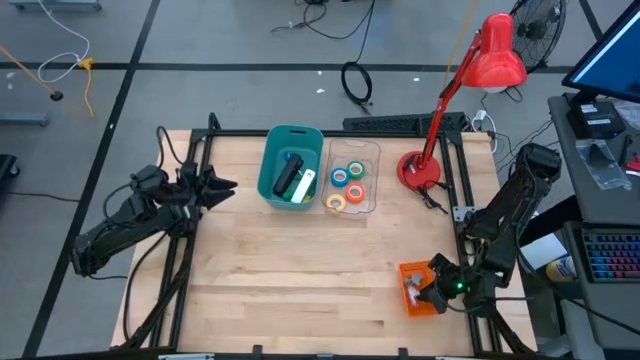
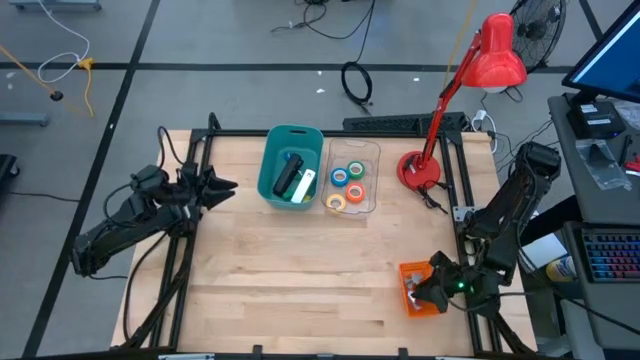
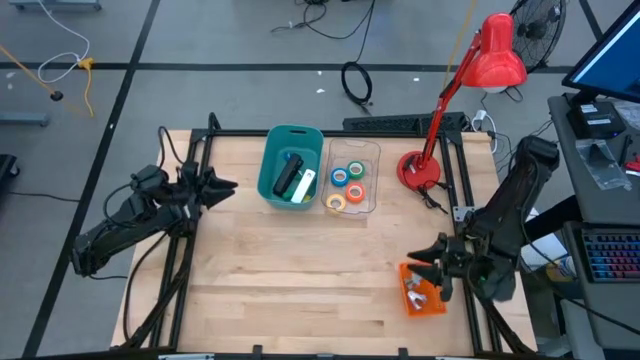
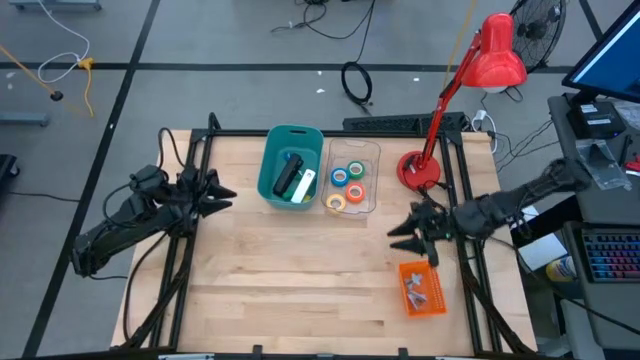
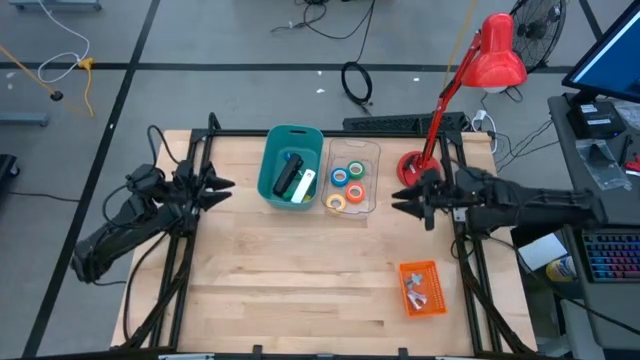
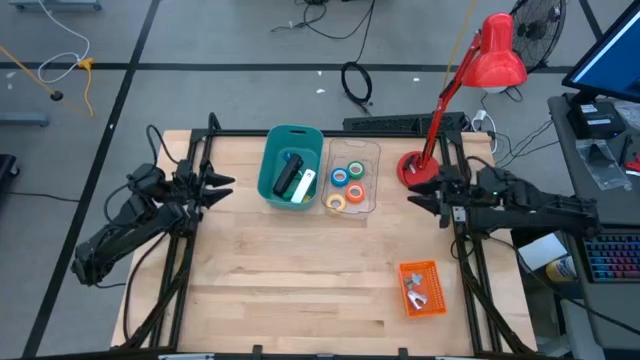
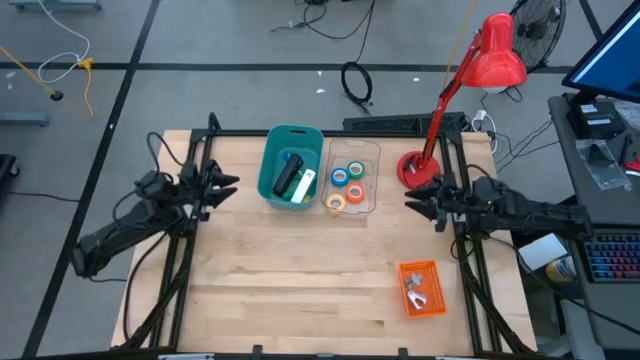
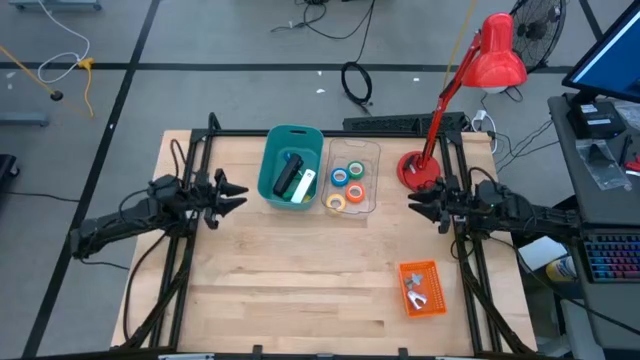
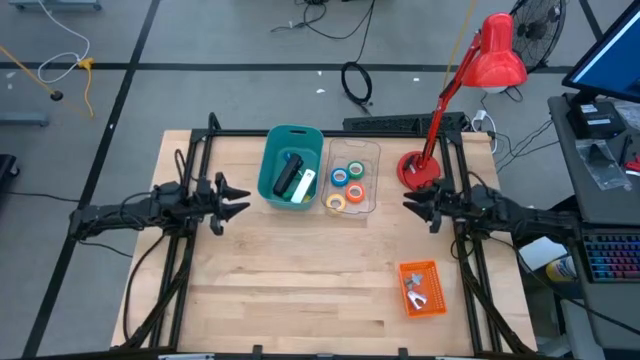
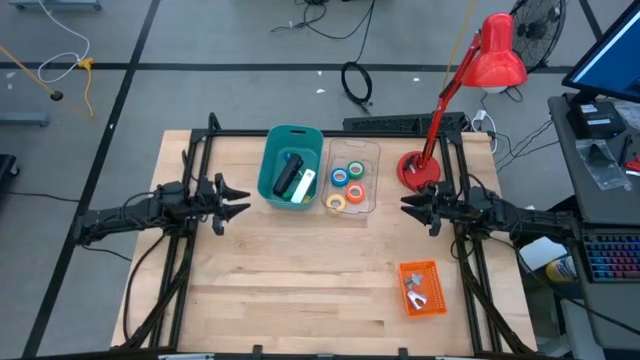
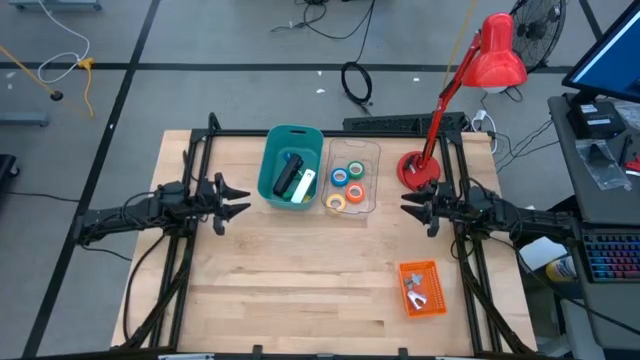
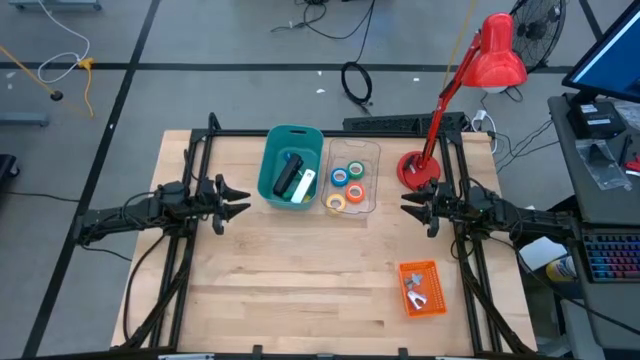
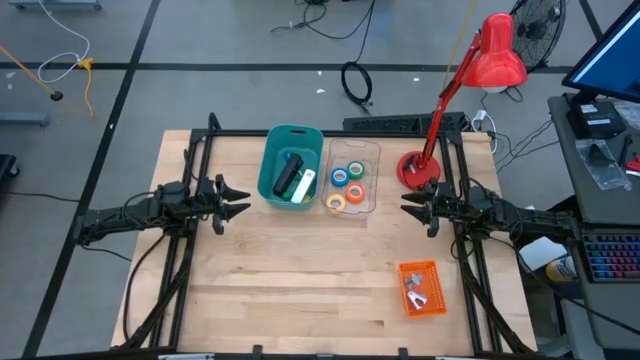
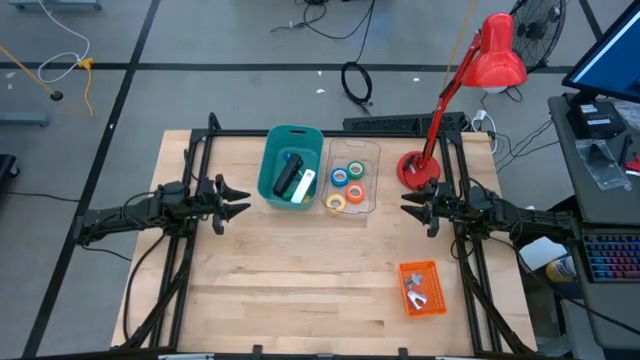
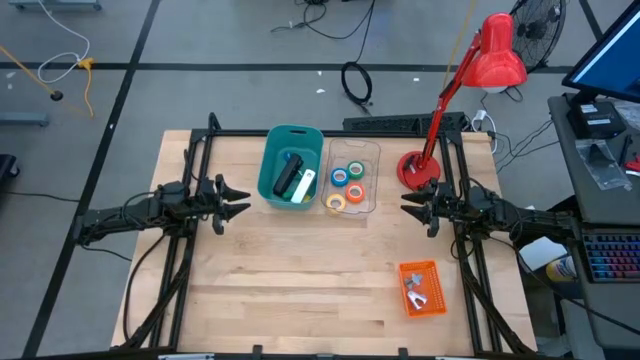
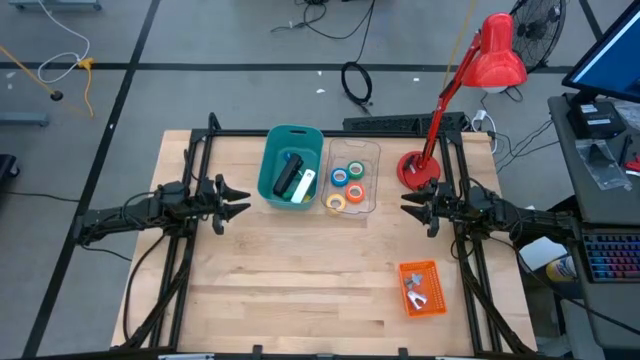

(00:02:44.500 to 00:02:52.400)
Task: Pick and place Stapler, Stapler remover, tape
Return to Home Position

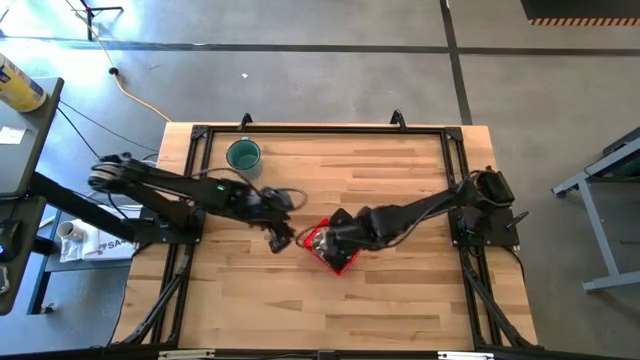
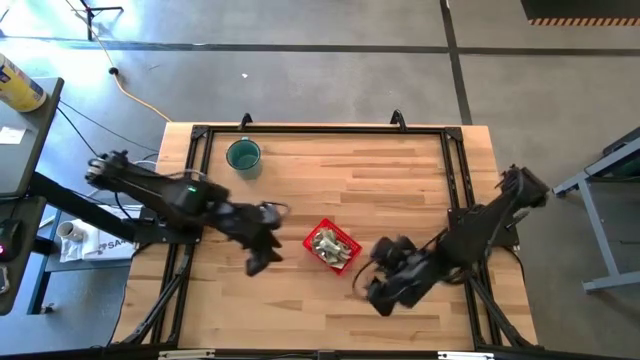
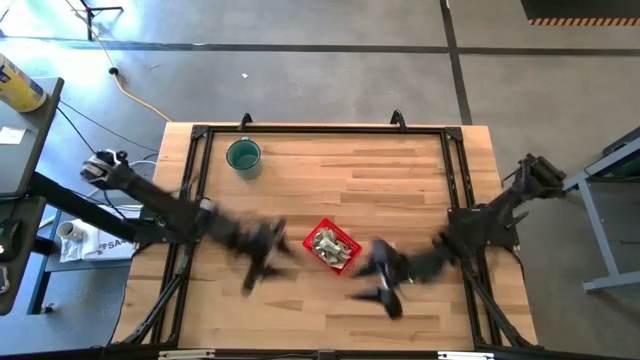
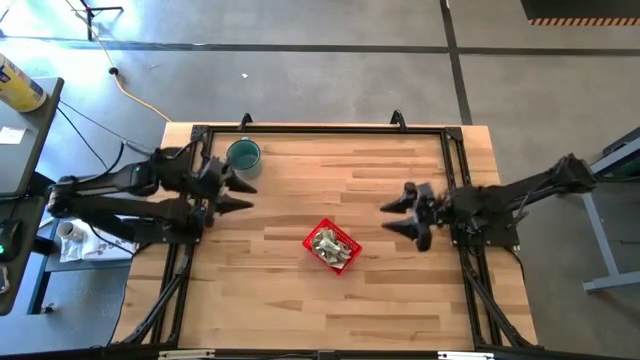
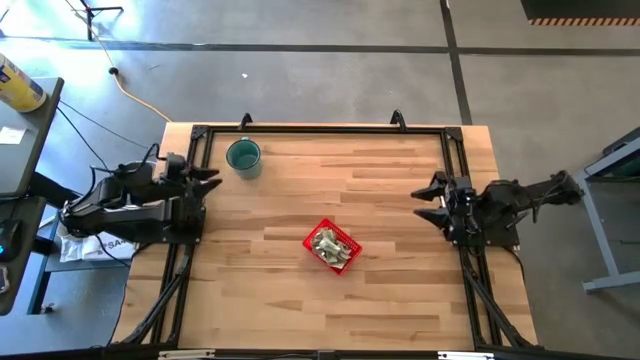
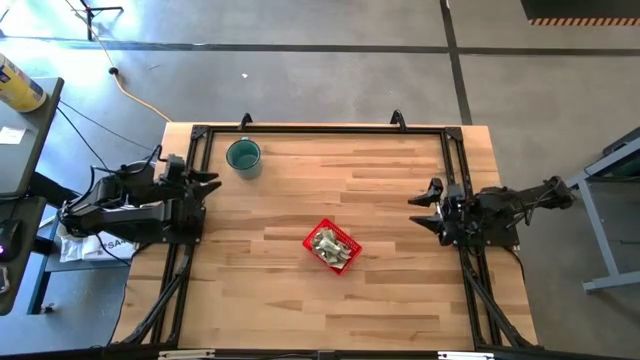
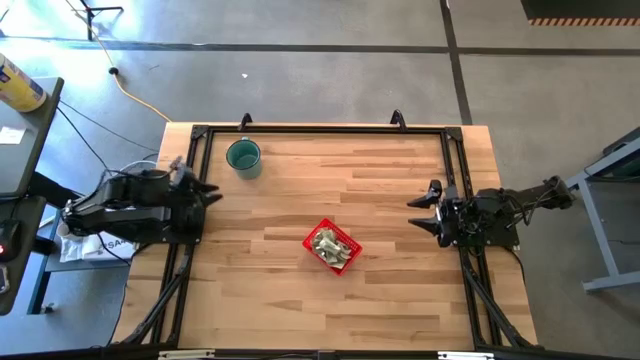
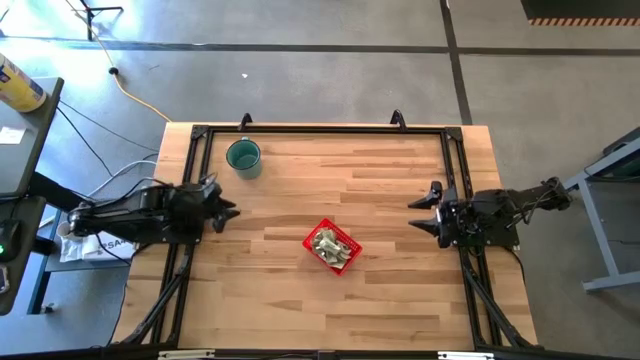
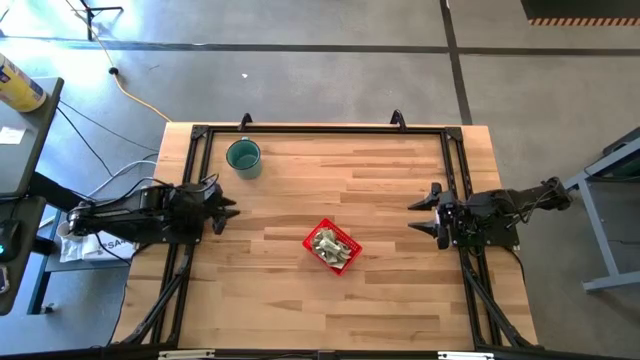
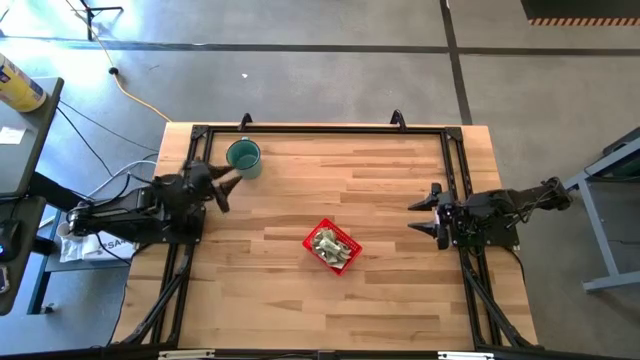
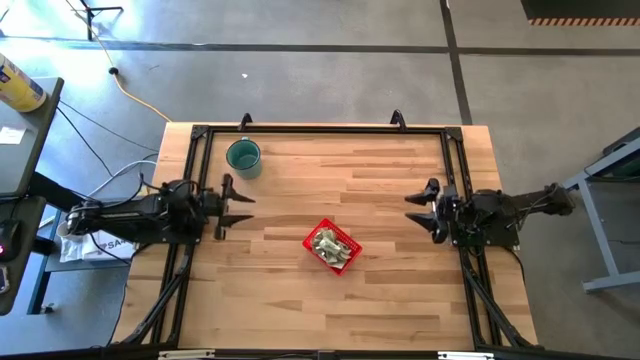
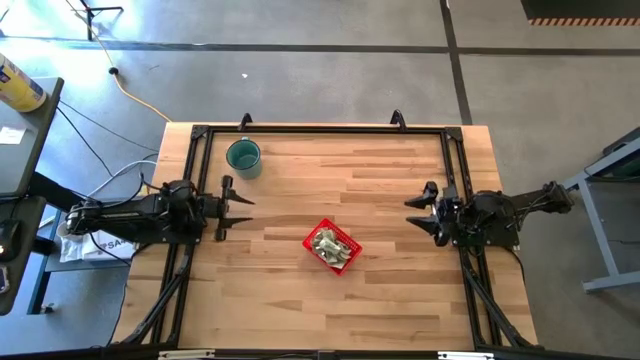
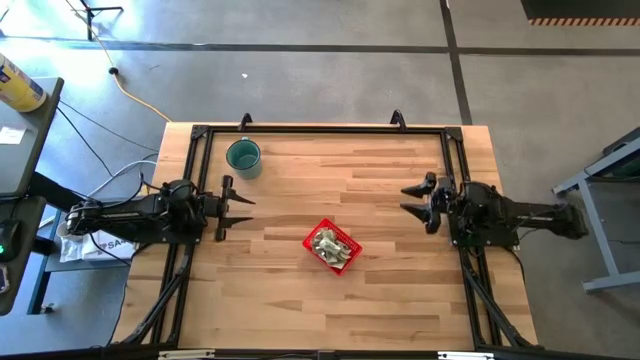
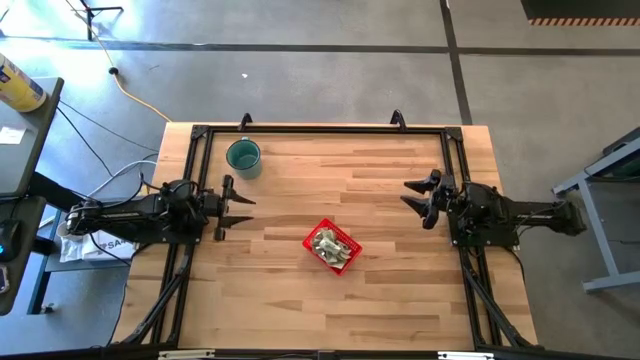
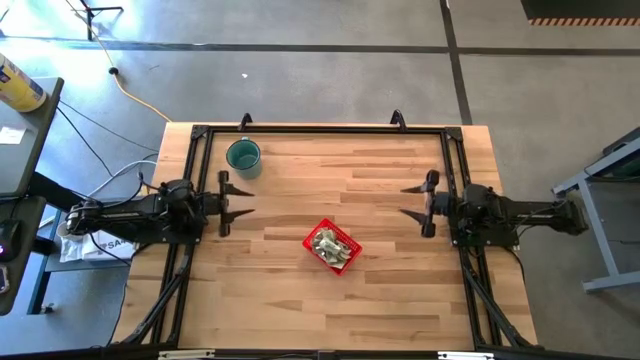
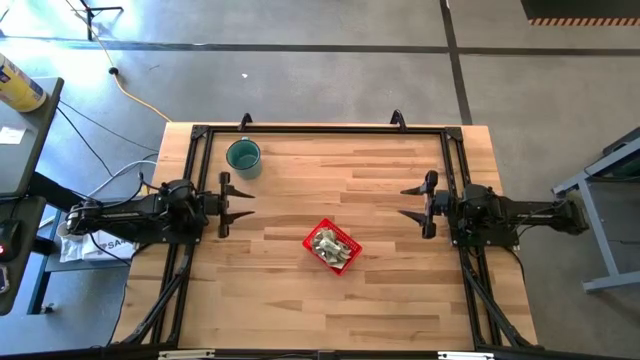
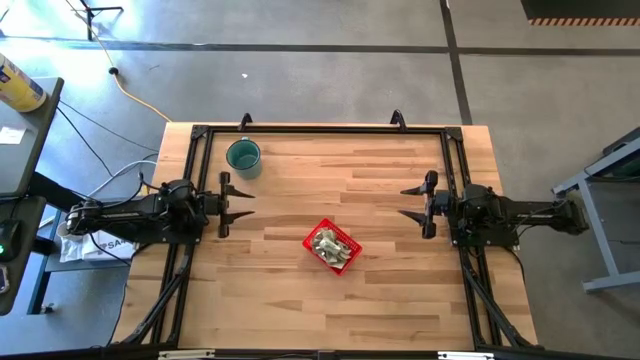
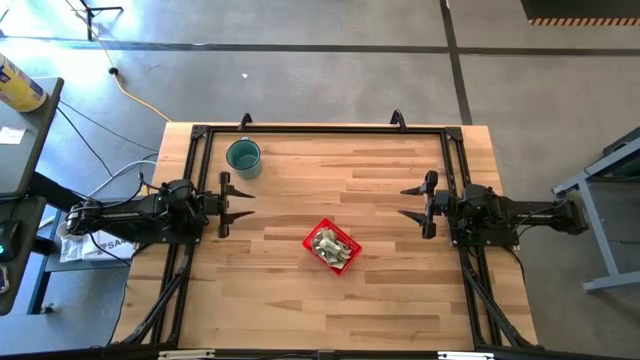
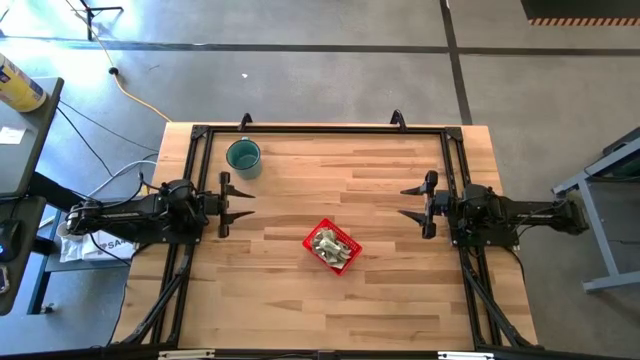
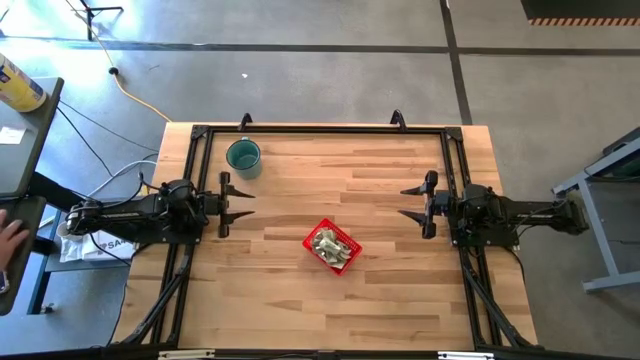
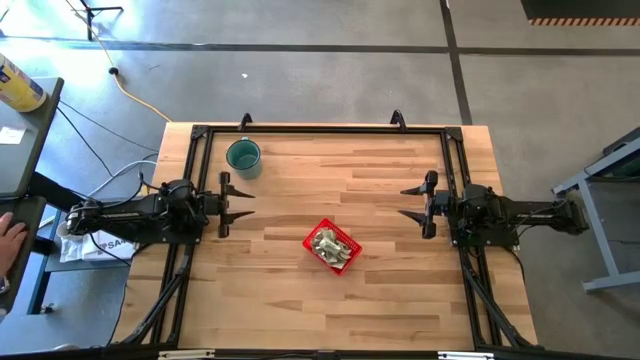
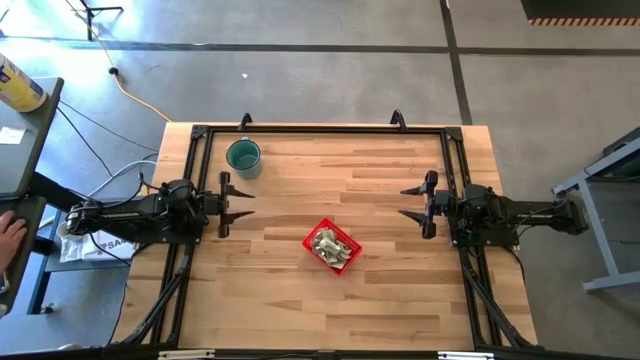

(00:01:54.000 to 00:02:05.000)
Task: Pick and place Stevia / Truvia into bins
Return to Home Position
